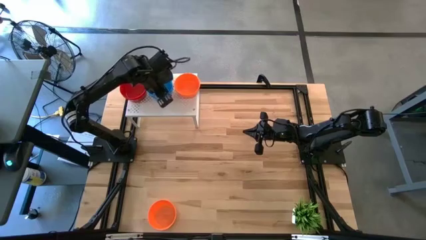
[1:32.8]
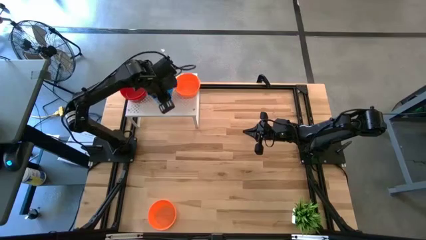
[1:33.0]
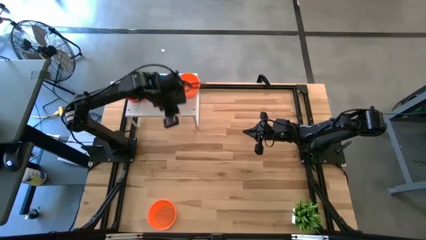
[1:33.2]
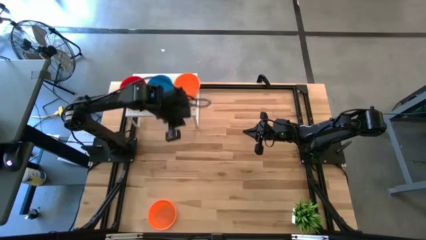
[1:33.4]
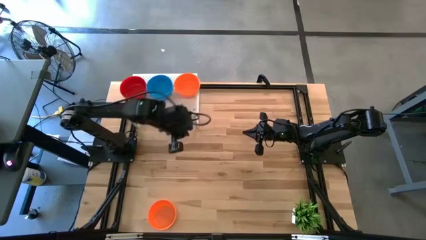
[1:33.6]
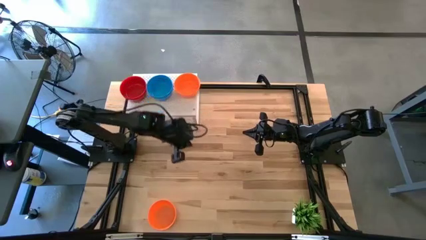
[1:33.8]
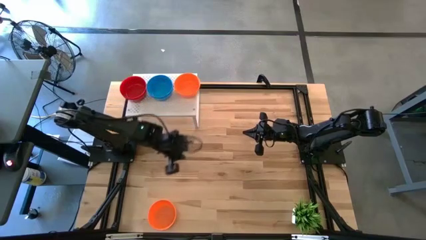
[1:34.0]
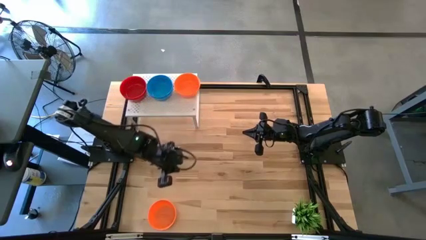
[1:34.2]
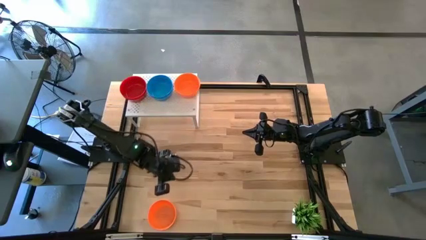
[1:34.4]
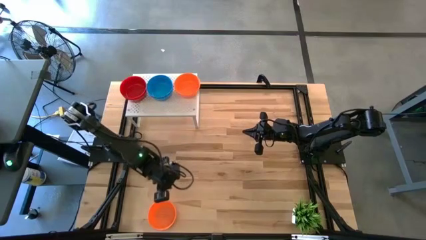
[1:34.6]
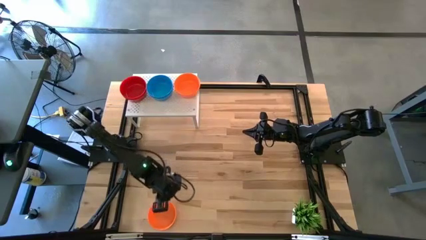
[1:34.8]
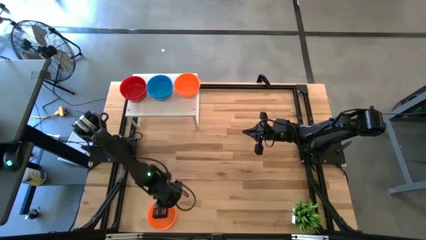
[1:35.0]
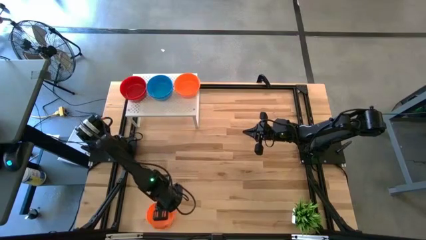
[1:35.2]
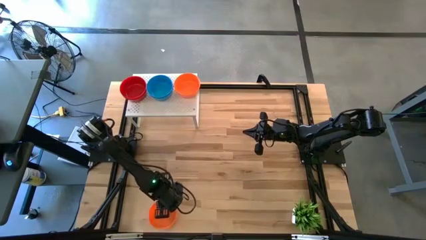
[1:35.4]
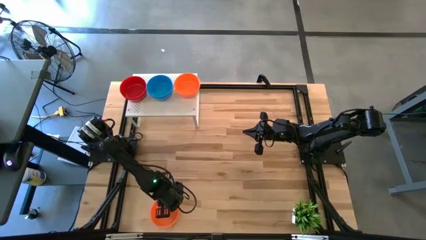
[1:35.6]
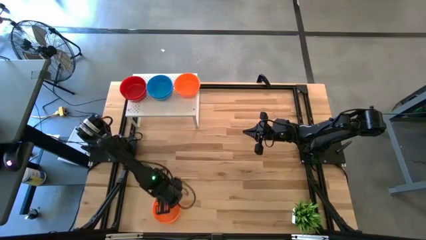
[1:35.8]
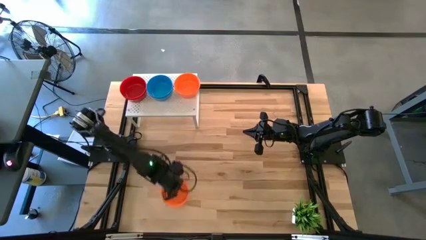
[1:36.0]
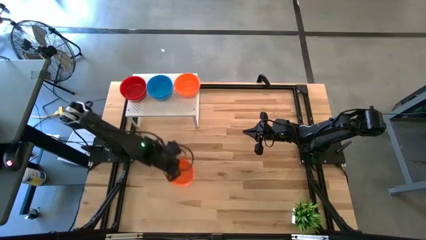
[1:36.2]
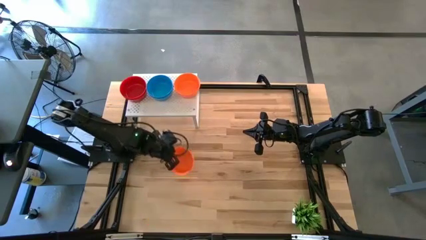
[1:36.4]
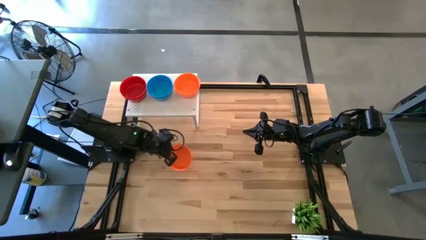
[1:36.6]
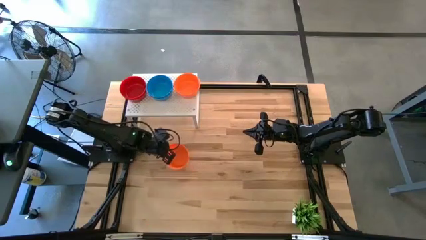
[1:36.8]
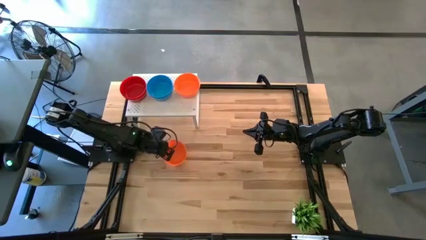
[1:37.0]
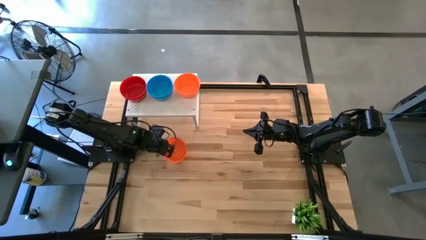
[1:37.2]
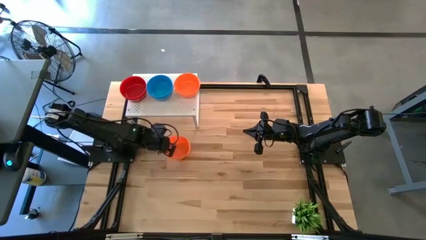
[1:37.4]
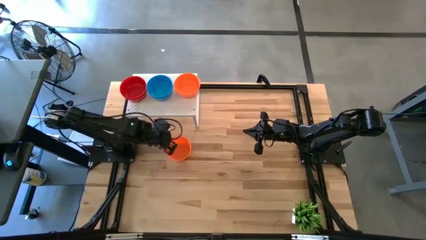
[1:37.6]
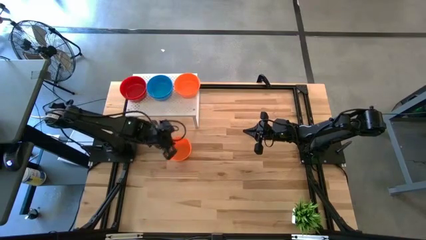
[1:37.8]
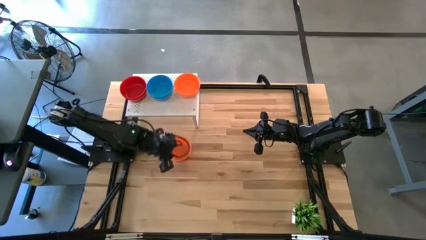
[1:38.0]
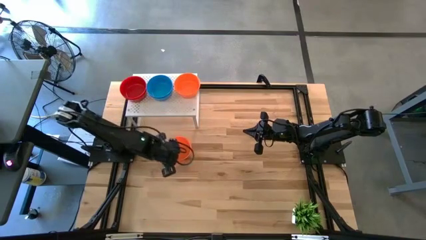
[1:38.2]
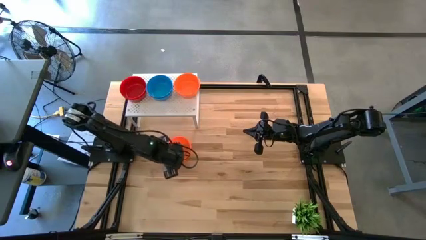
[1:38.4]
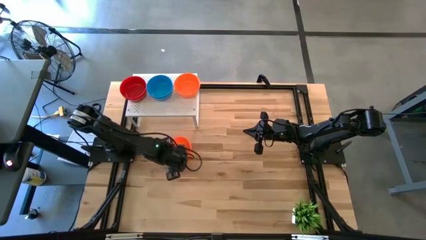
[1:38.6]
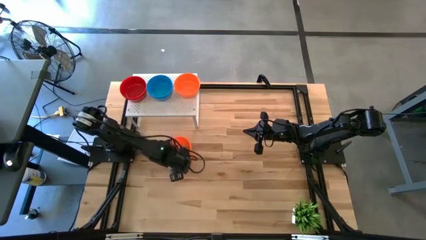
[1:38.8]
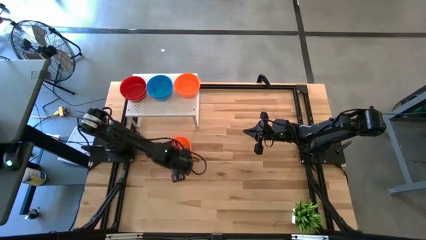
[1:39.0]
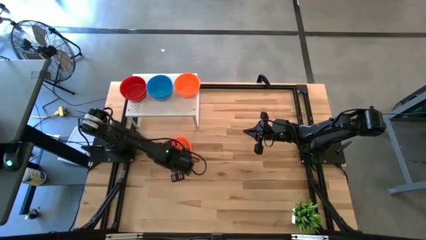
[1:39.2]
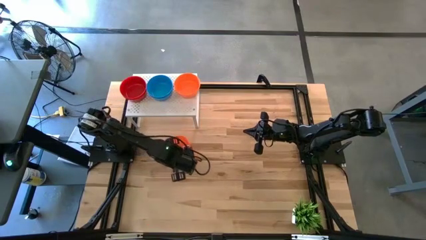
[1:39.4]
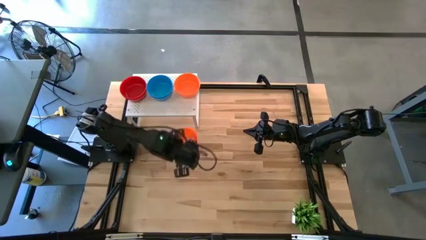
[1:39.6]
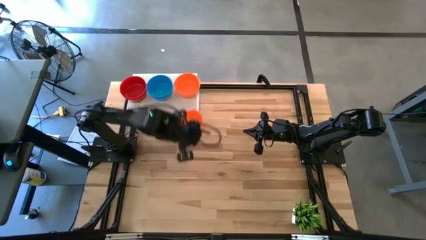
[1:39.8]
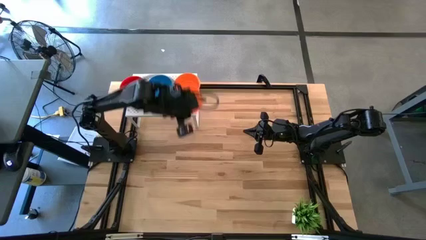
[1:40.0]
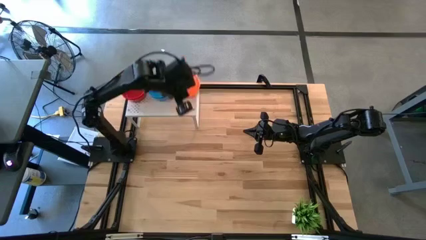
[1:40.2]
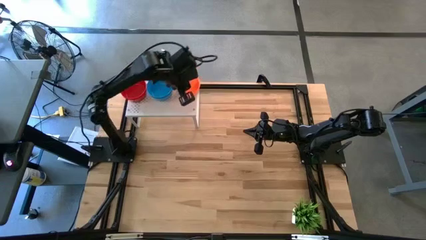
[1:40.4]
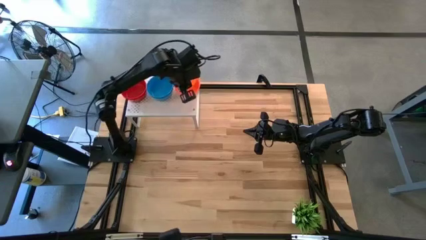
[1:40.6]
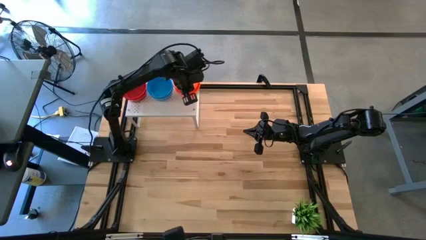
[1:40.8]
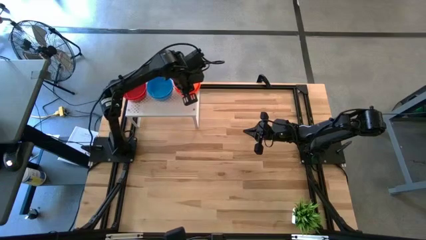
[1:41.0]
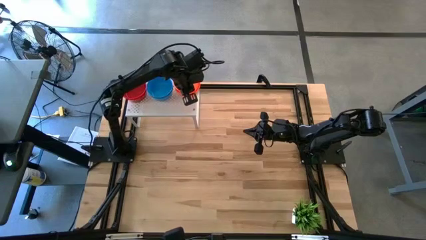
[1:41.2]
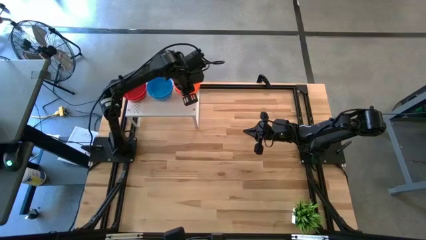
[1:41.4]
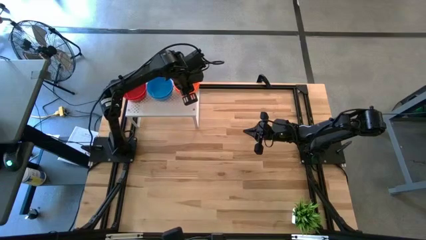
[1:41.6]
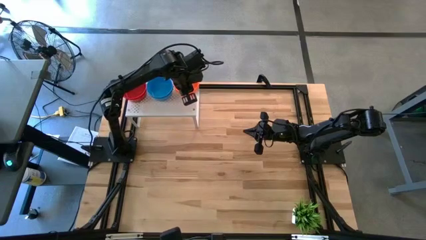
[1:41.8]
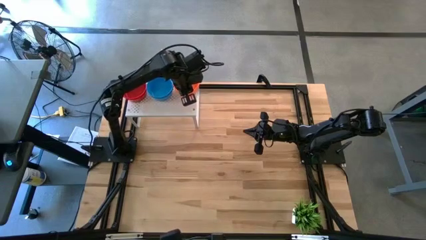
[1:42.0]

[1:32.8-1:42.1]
Task: Pick & Place Mini bowls
Stack the orange bowl on the orange bowls on the shelf

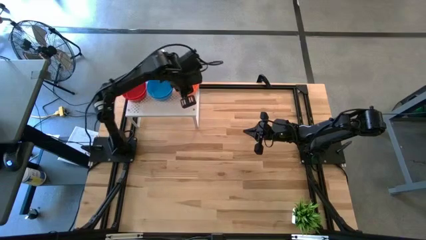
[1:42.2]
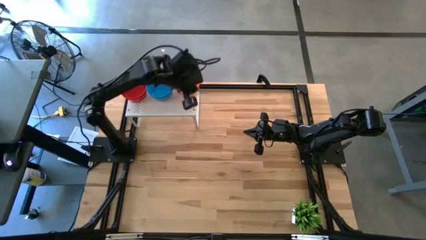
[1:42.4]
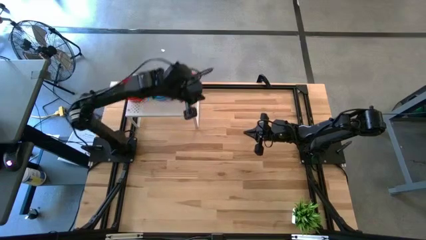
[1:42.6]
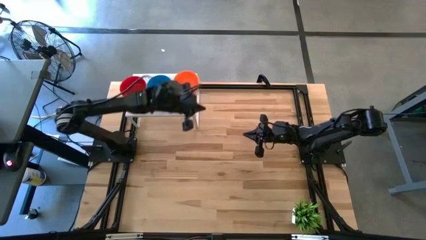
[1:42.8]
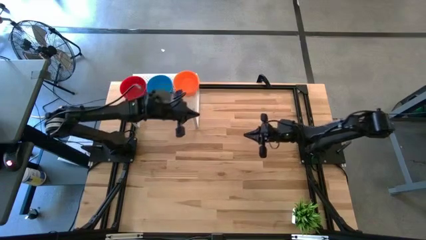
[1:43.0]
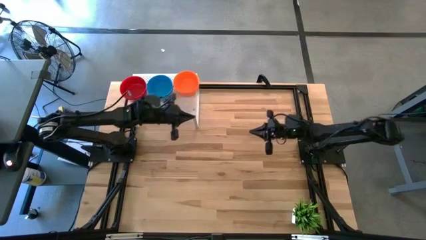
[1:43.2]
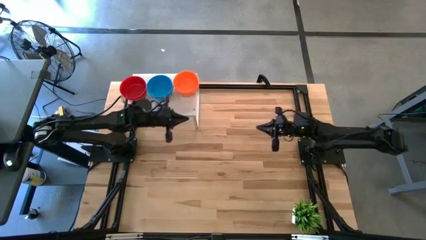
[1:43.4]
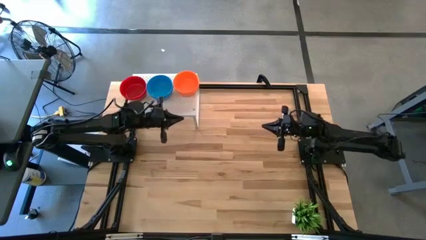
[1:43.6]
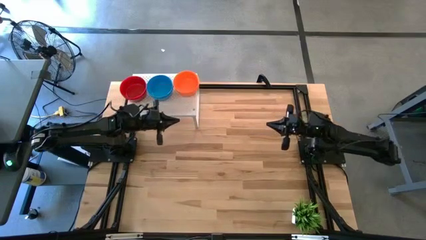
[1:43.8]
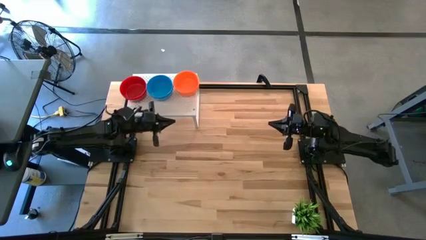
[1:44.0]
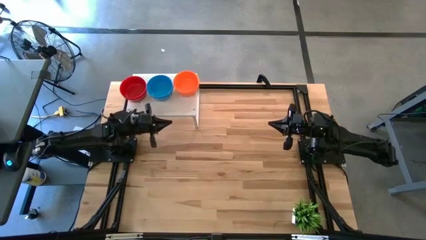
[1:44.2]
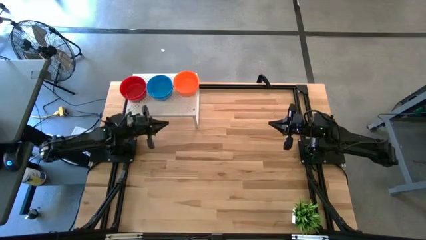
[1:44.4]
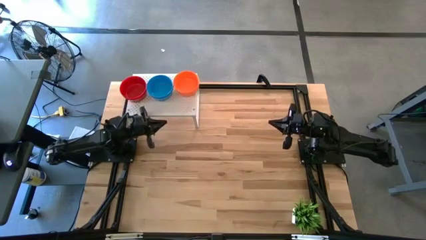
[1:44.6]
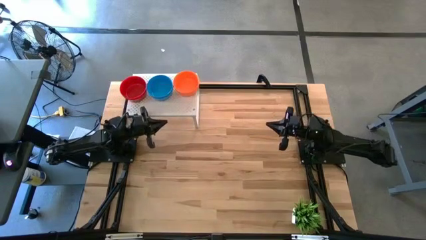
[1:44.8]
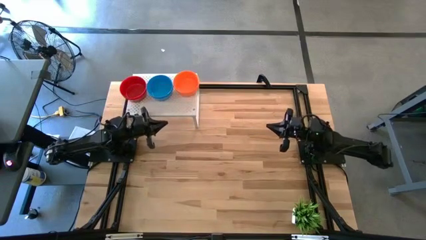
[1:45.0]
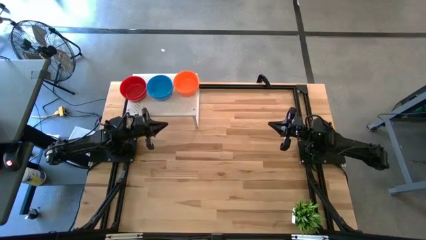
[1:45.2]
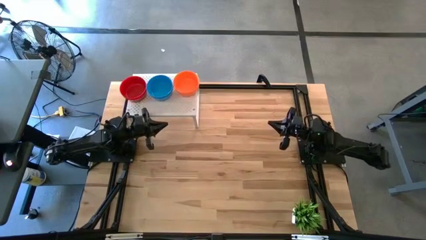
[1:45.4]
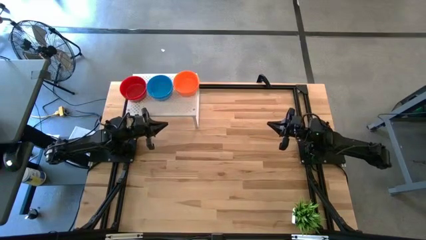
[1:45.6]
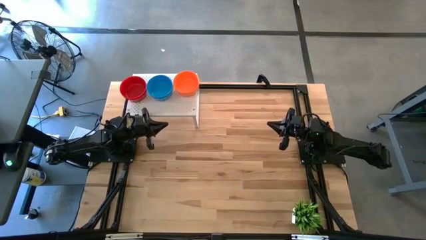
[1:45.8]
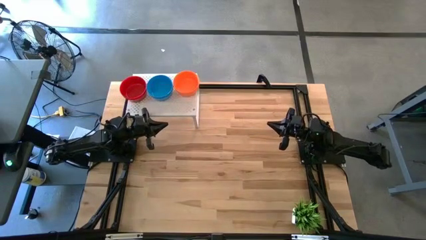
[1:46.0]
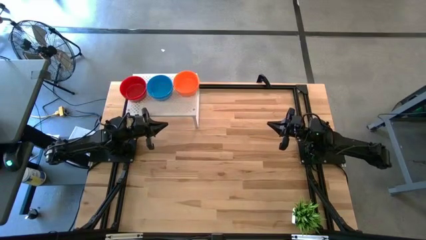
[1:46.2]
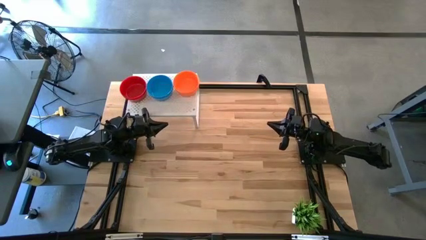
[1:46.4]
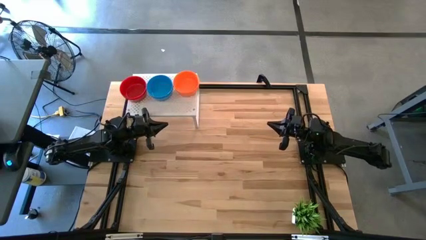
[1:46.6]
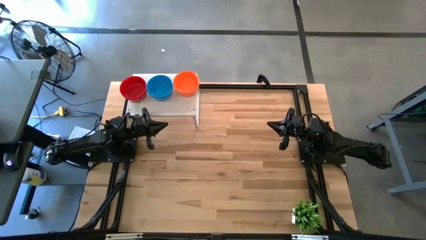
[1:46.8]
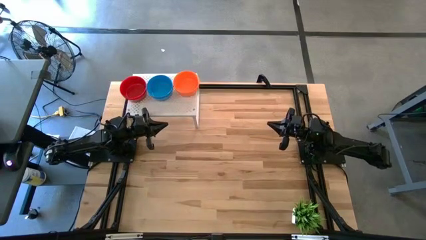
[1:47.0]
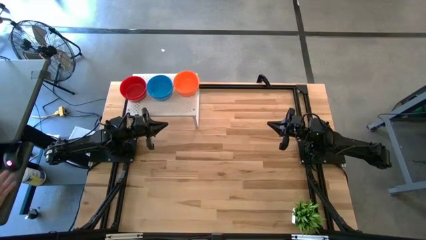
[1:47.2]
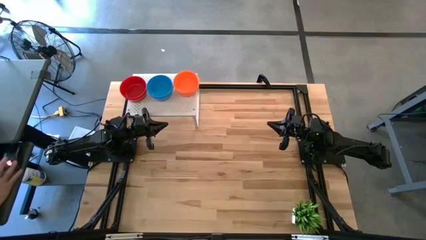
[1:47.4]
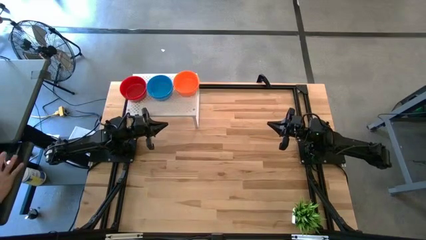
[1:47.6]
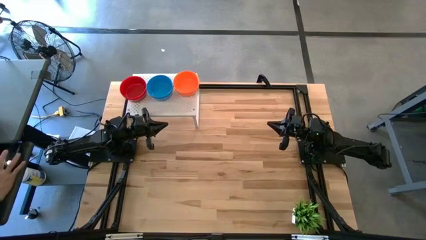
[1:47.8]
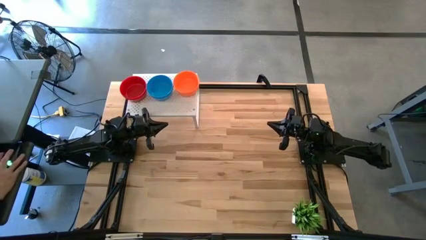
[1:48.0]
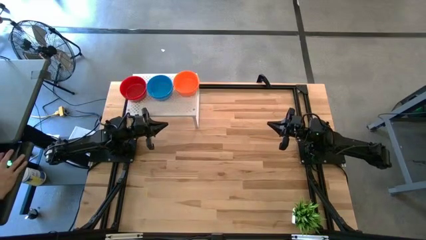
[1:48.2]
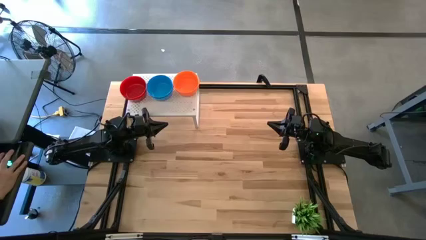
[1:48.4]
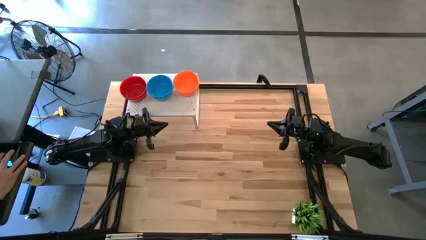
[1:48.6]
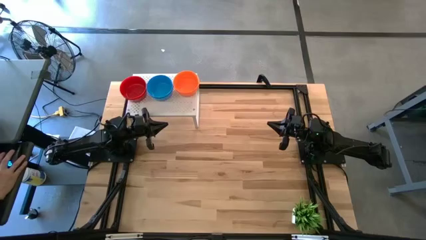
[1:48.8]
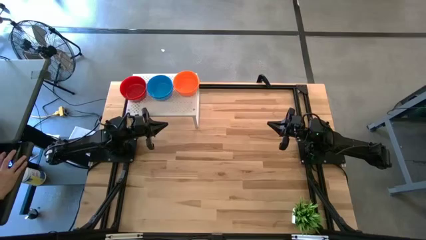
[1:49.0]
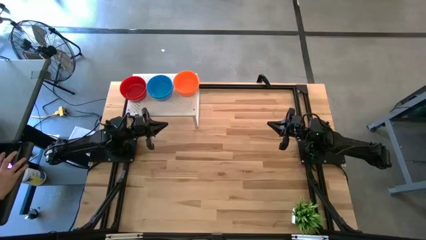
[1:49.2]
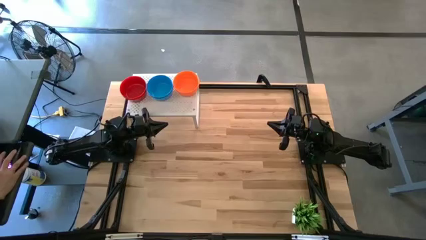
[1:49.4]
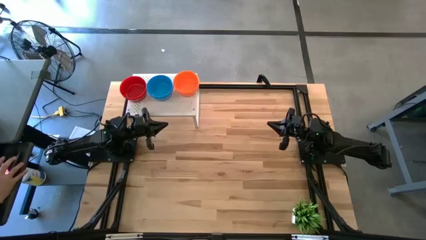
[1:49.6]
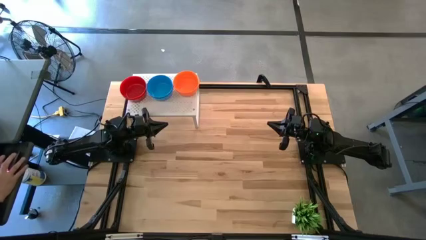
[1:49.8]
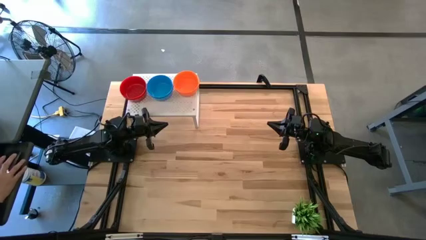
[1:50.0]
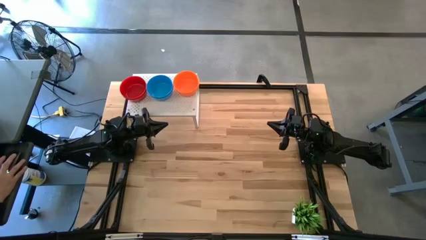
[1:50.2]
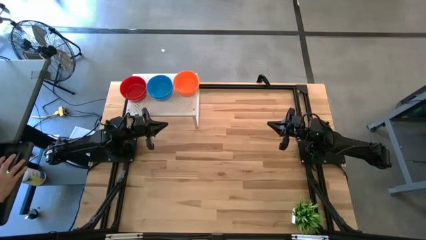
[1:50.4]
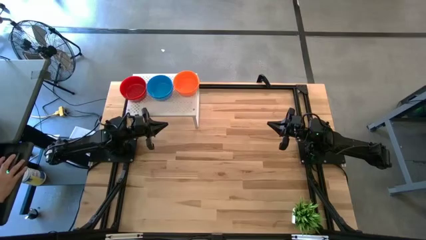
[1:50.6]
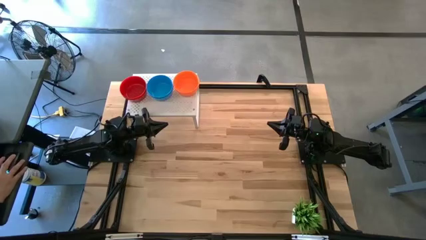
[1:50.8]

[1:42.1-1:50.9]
Return to Home Position
